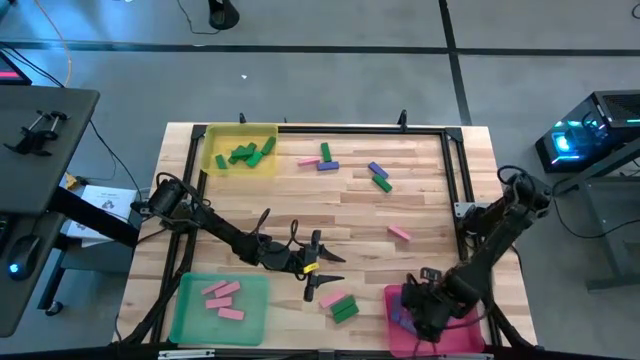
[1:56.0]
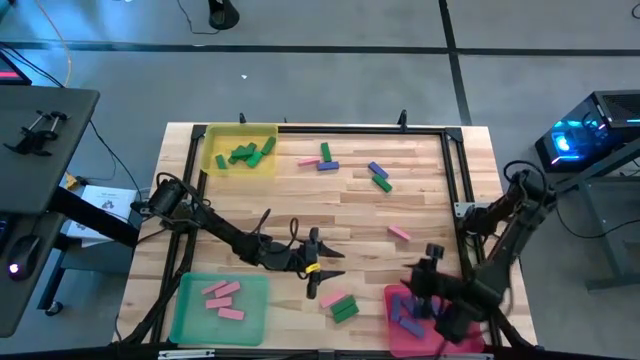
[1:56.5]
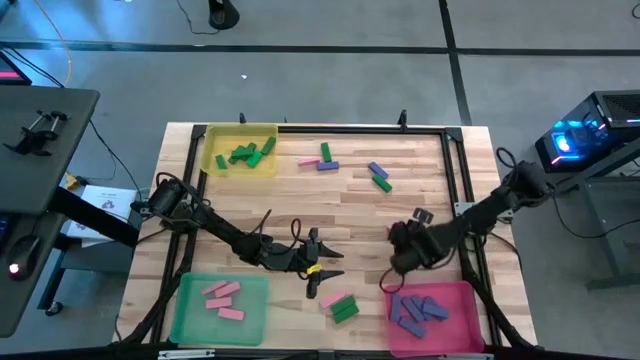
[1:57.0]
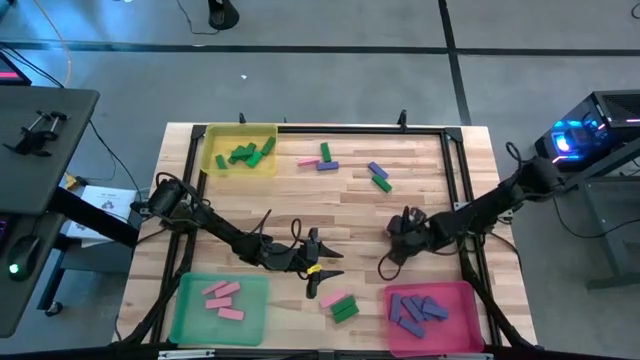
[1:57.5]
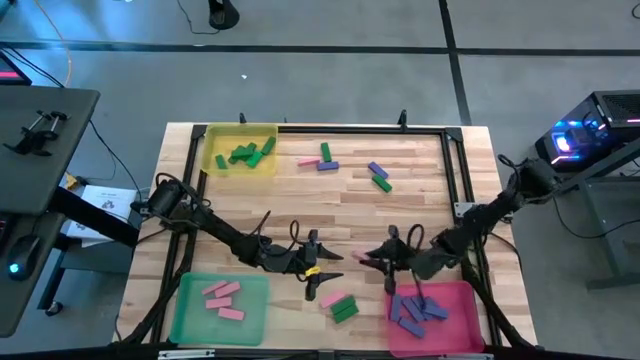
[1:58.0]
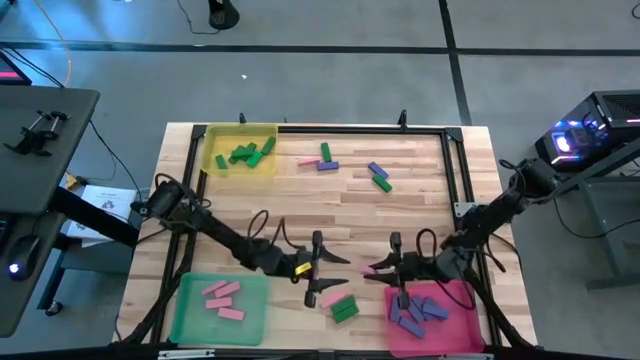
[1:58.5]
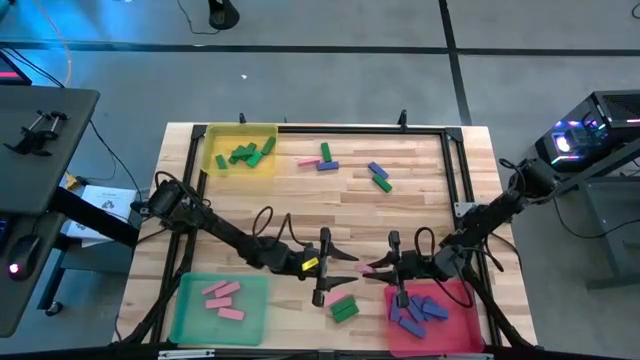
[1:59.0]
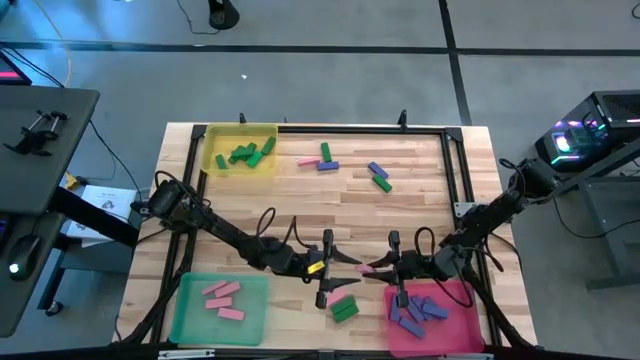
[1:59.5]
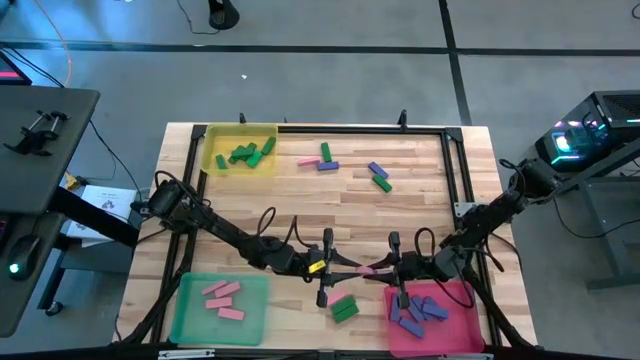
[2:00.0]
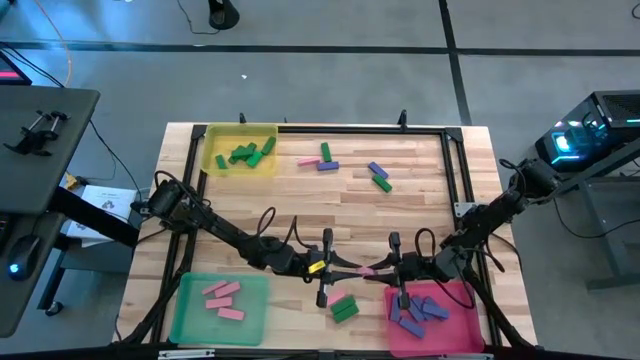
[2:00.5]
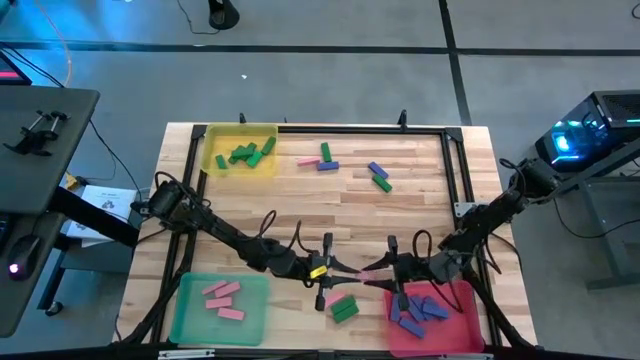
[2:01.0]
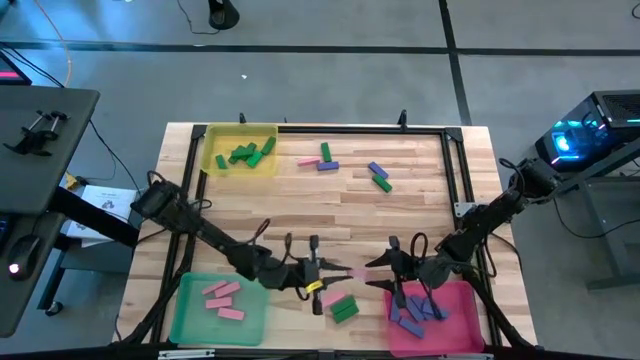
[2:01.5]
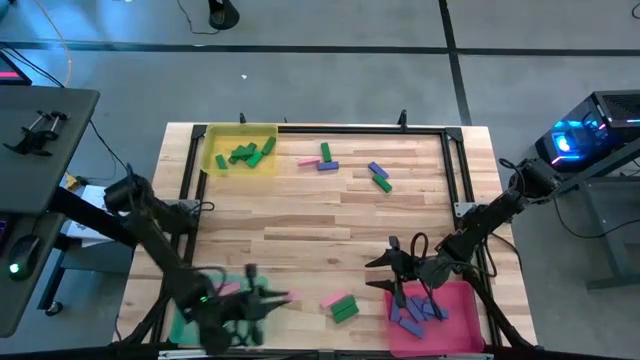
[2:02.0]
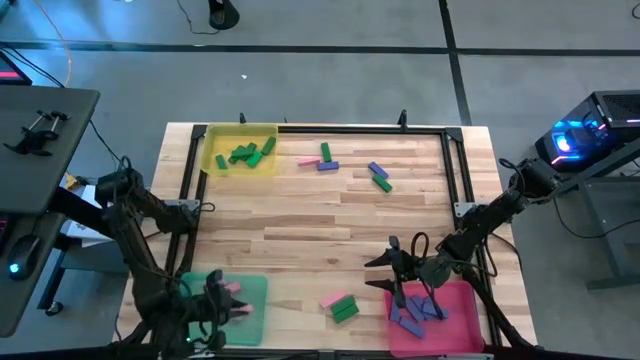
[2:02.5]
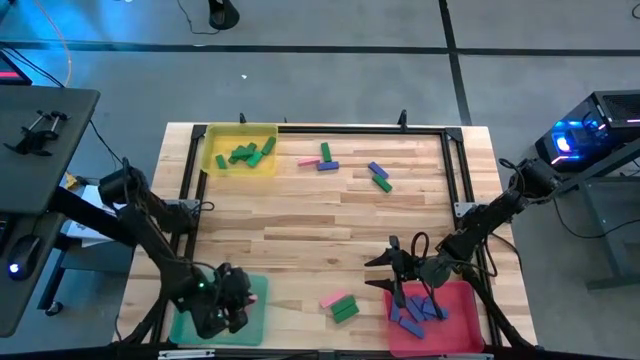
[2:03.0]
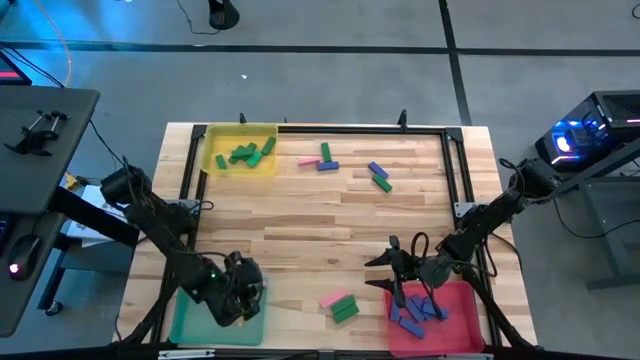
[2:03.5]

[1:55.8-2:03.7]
Task: Sort blocks
Put the pink block into the green bin

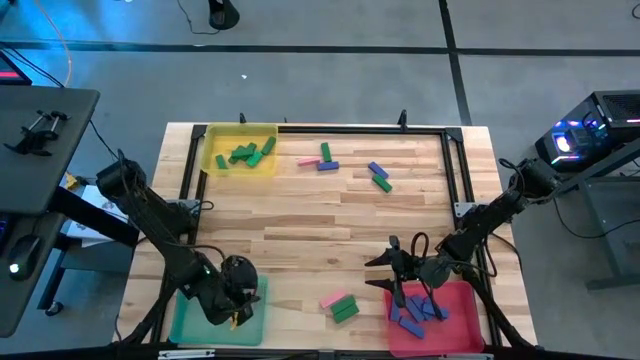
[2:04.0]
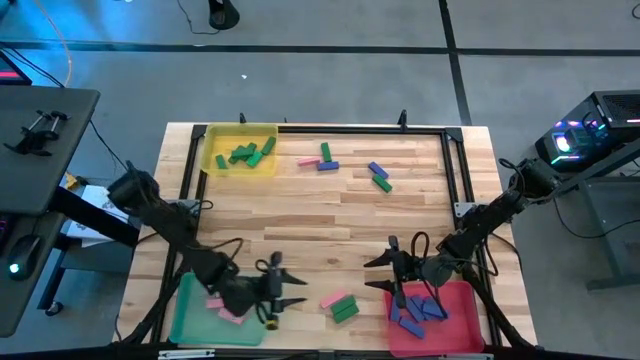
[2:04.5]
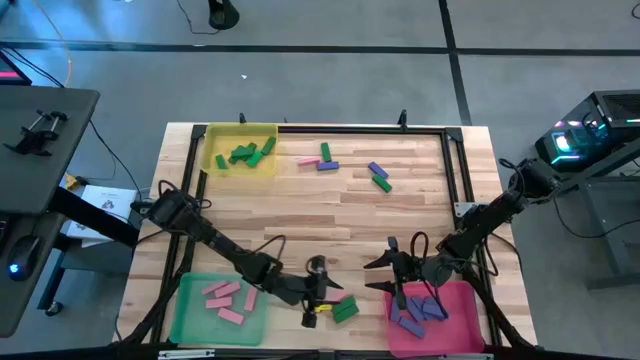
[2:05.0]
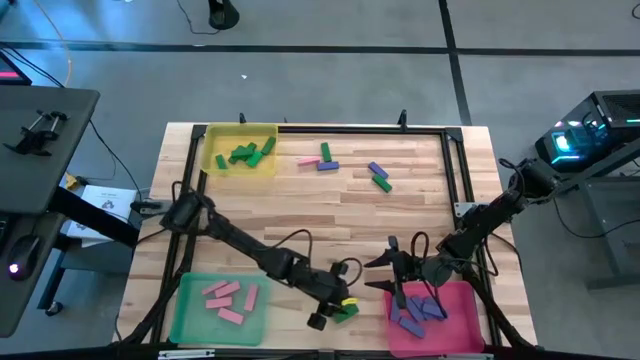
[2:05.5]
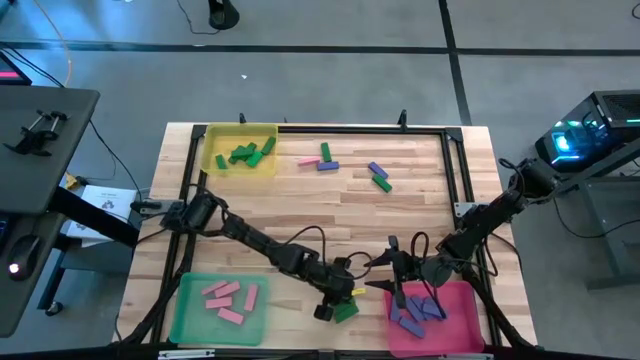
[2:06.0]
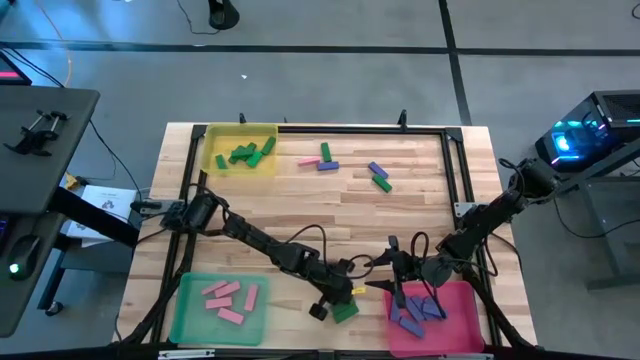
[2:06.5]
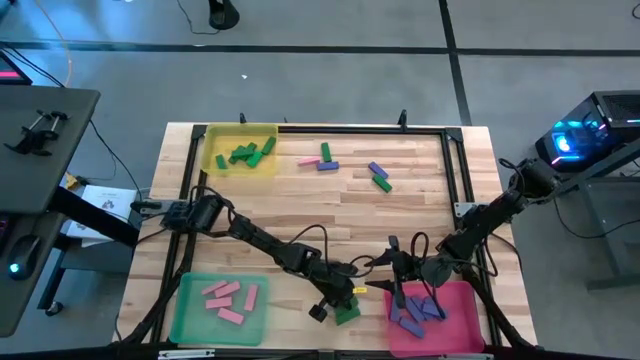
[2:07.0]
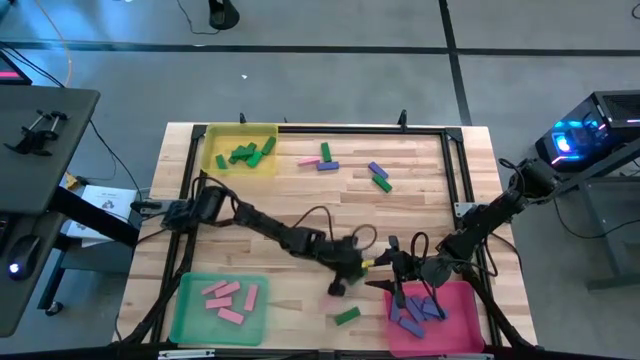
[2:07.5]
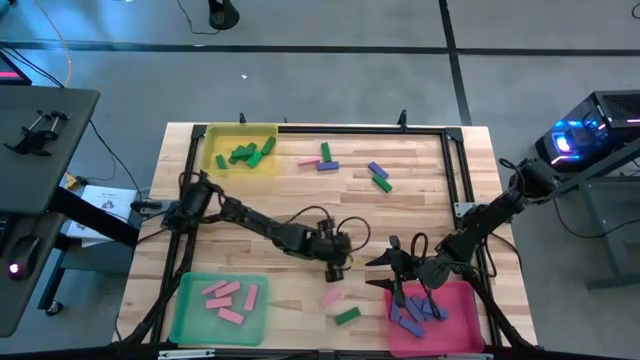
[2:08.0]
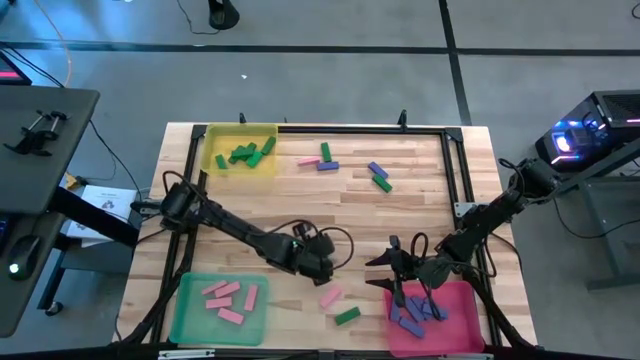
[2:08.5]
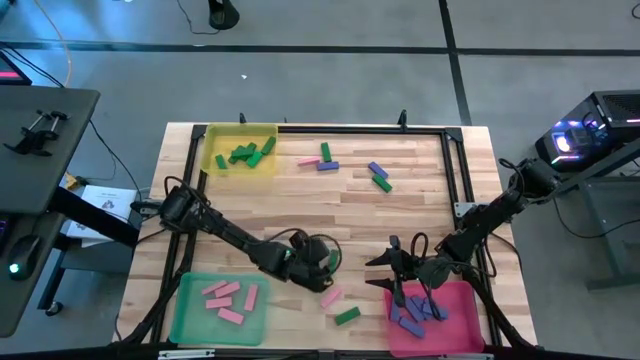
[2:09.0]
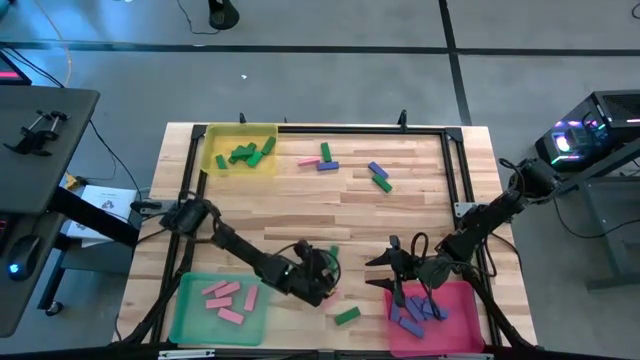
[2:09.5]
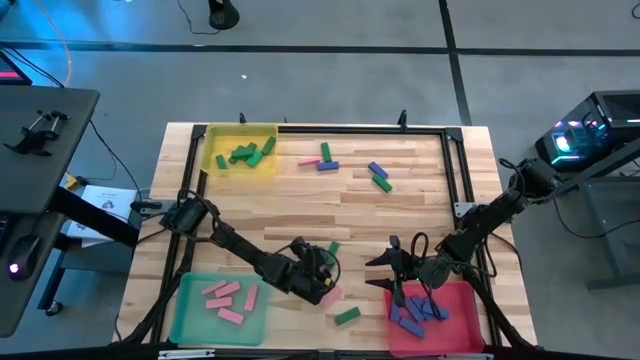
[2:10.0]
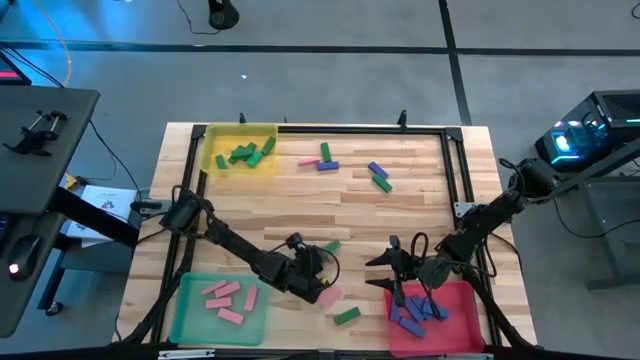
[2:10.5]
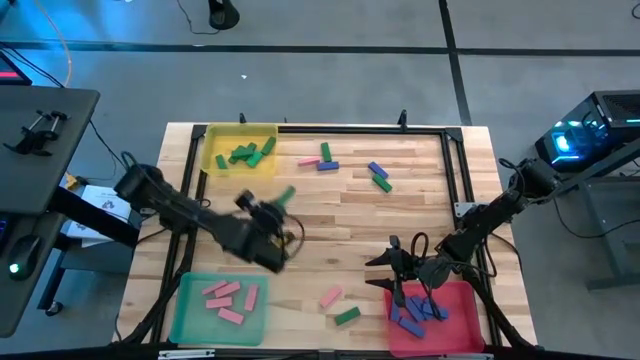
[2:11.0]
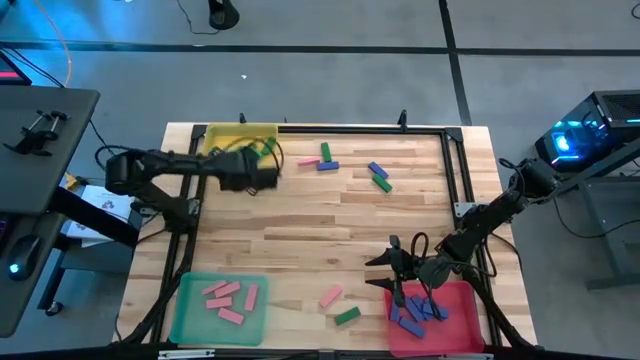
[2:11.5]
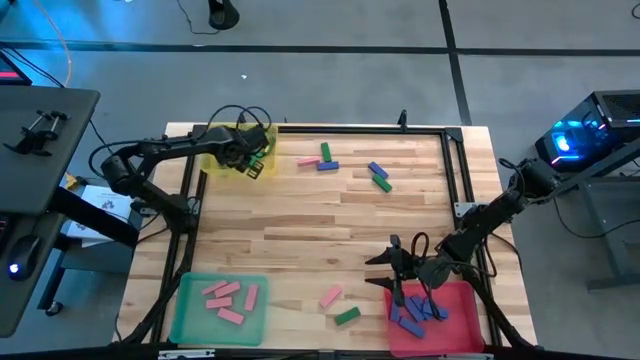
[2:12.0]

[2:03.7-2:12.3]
Put the green block into the yellow bin

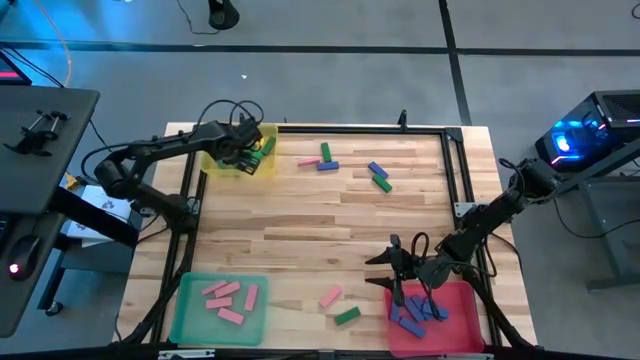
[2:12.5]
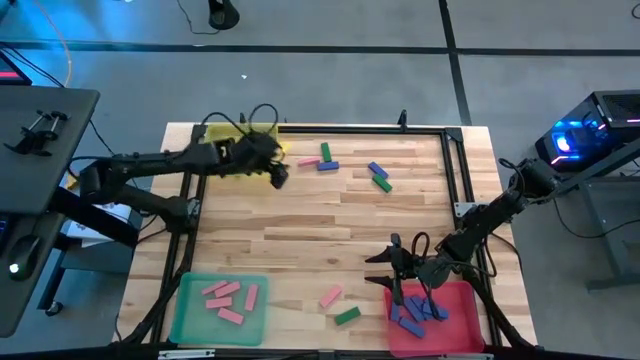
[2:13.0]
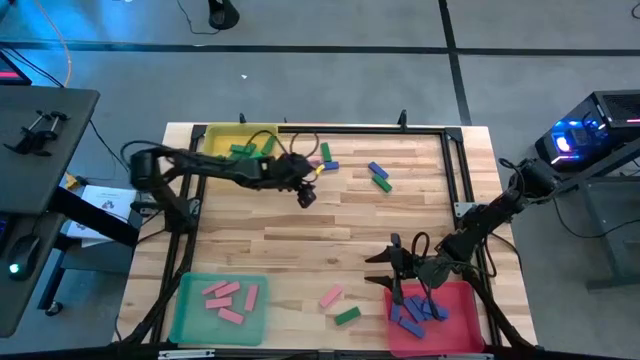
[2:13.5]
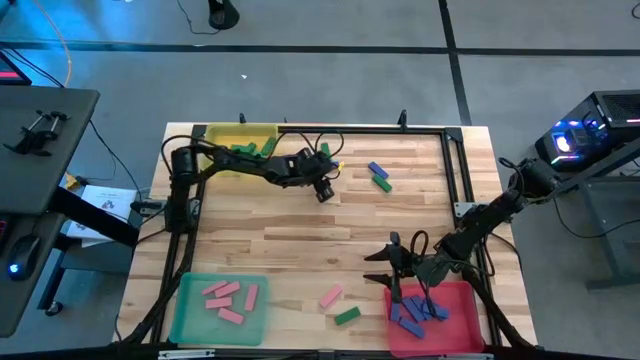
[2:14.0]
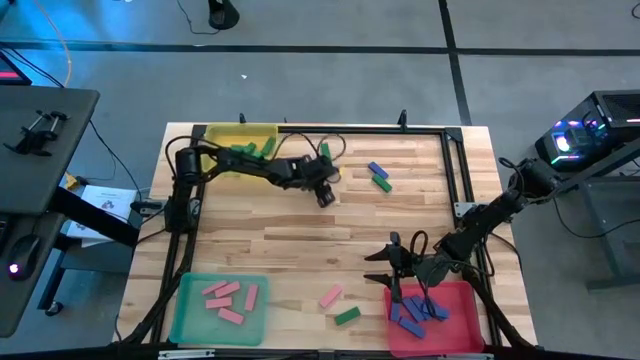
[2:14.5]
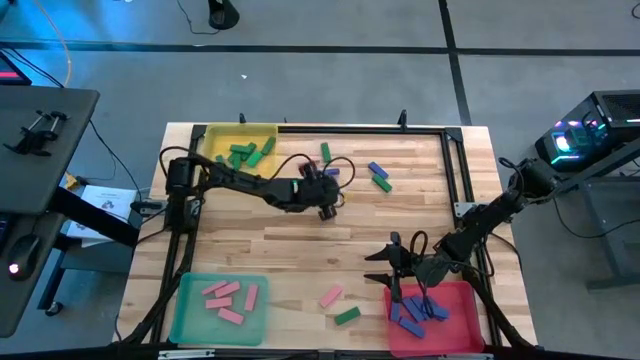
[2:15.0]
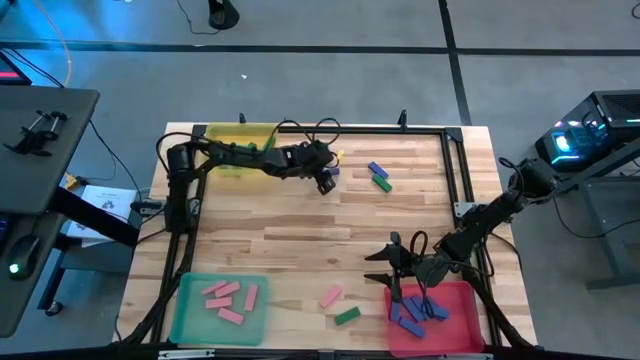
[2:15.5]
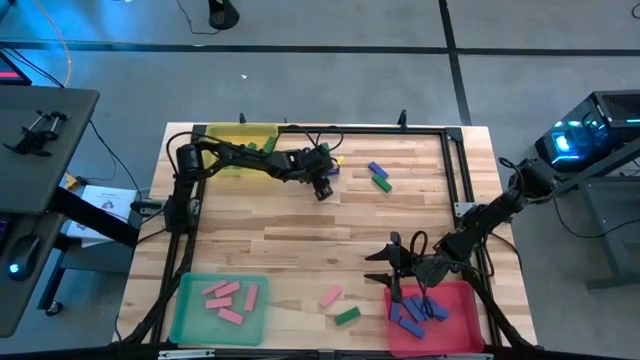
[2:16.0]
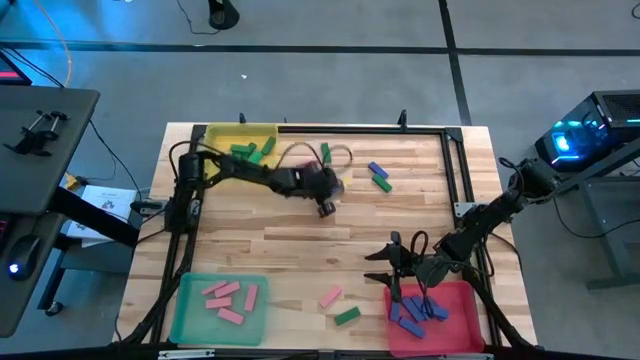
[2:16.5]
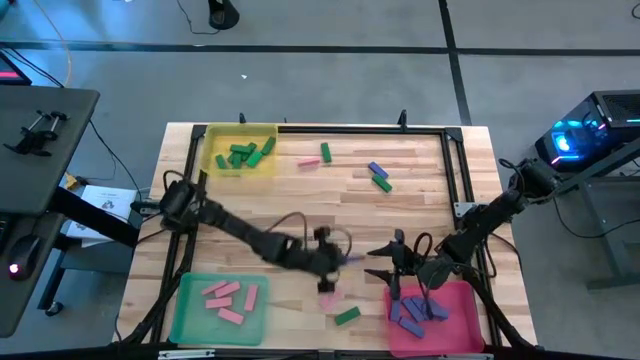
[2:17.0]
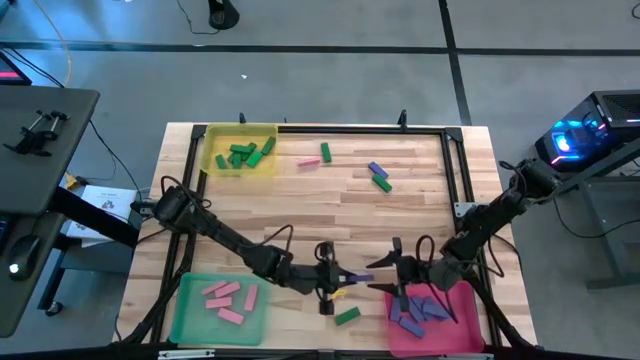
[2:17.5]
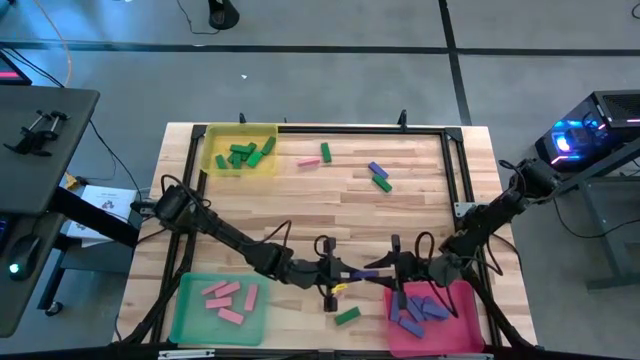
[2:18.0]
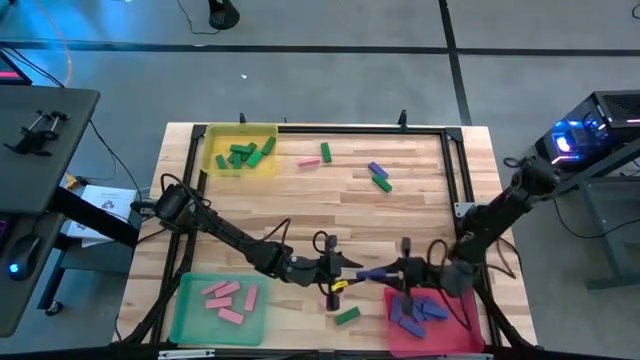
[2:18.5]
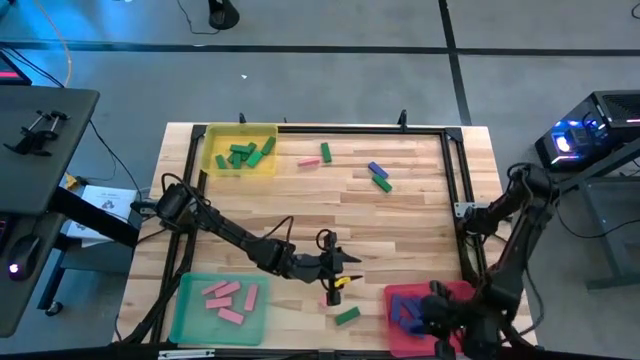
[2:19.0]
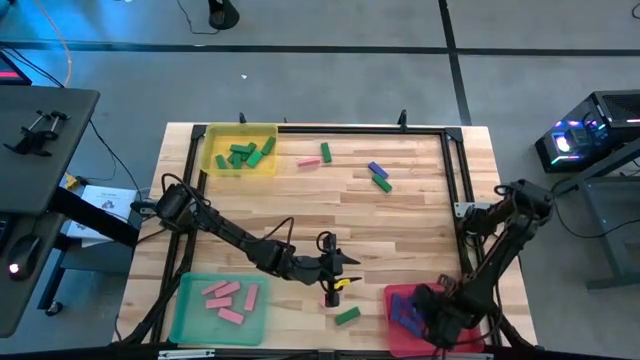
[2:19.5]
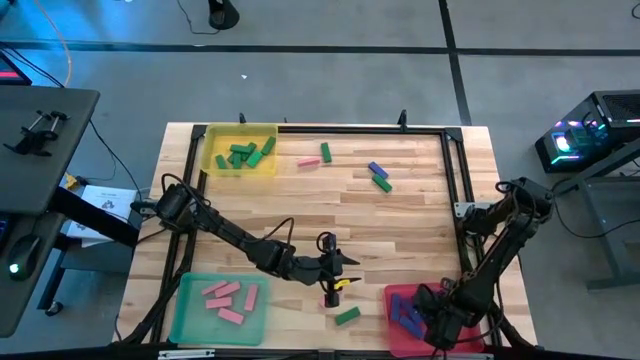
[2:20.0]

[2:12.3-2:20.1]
Put the violet block into the pink bin
